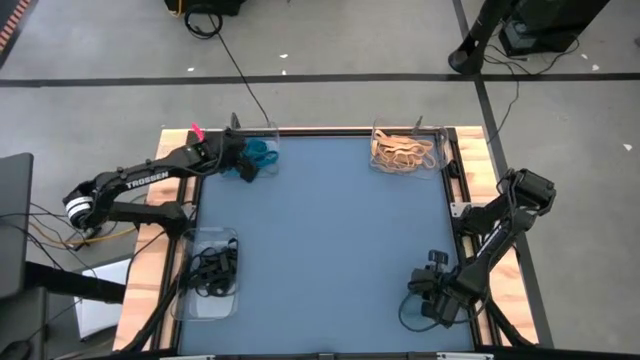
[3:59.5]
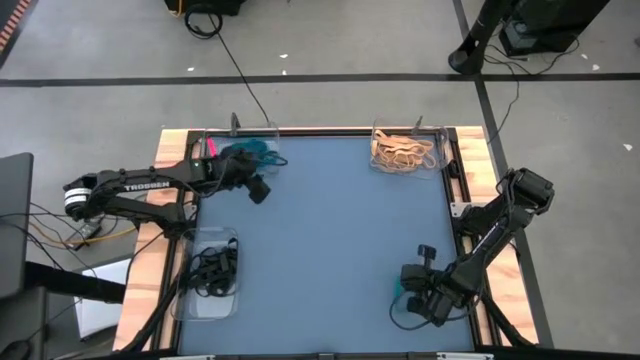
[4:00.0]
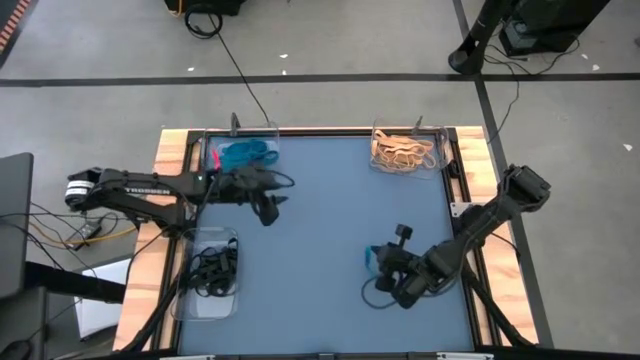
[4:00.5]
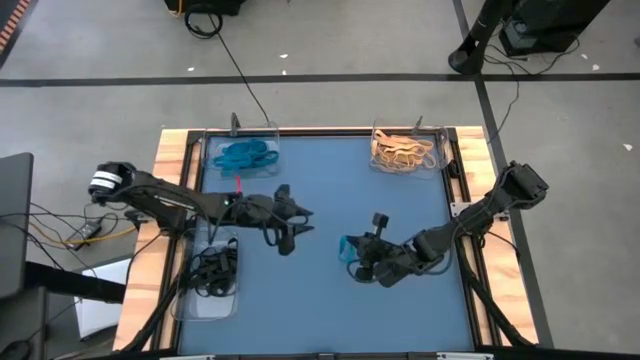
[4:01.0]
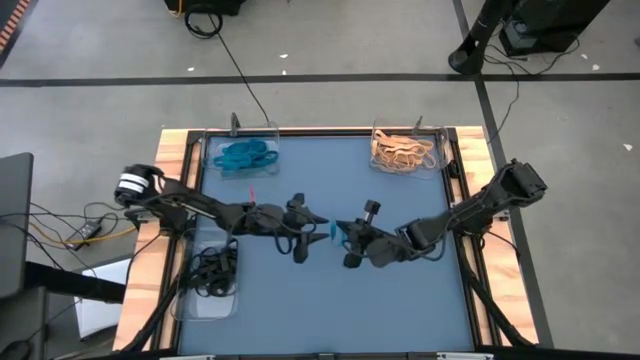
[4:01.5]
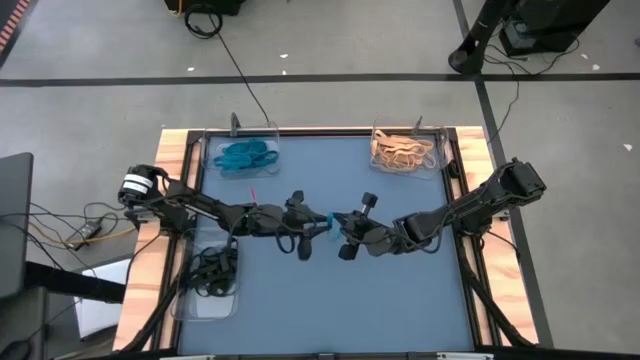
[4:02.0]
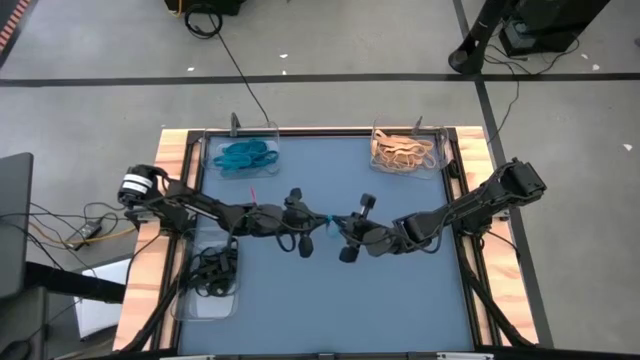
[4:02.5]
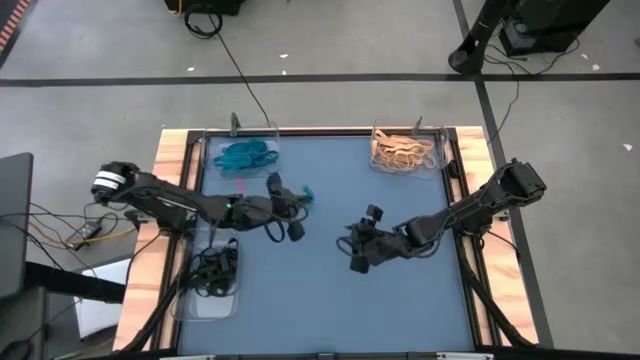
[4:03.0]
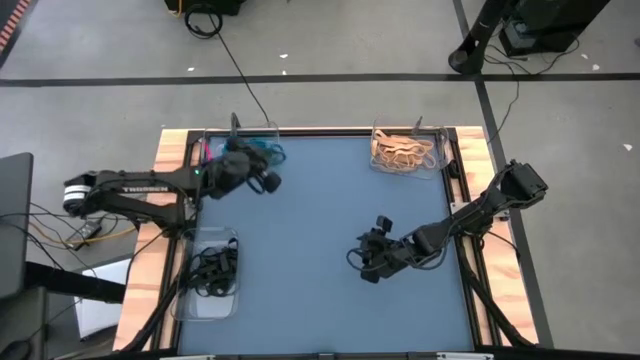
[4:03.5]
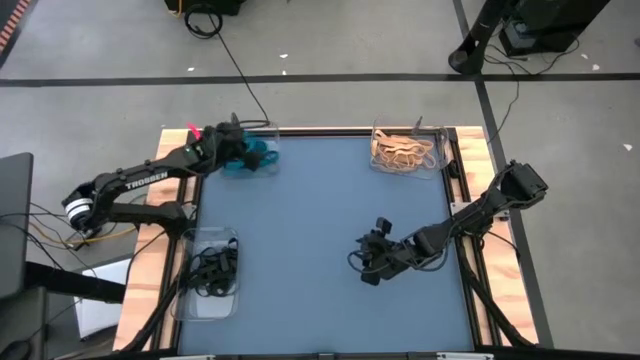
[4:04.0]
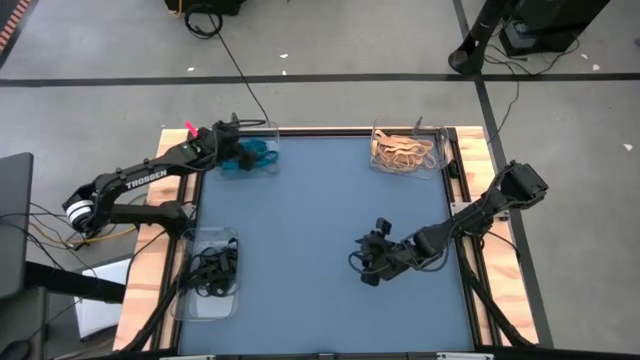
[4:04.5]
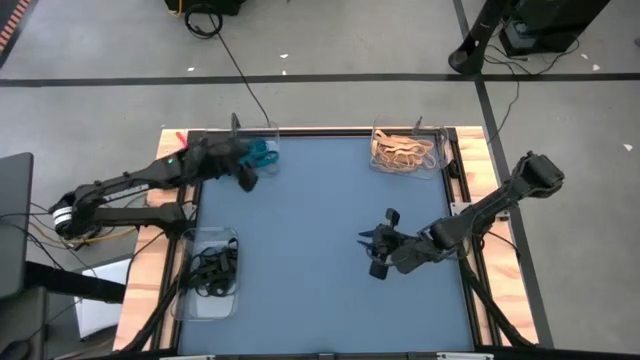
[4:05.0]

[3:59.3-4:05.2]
Task: Sort rubber bands into baskets
Put the blue rubber band into the top left transparent bin

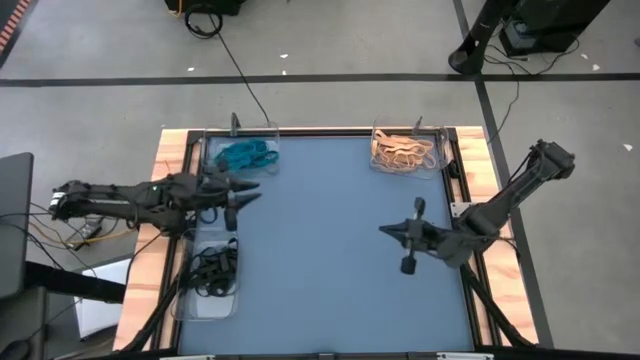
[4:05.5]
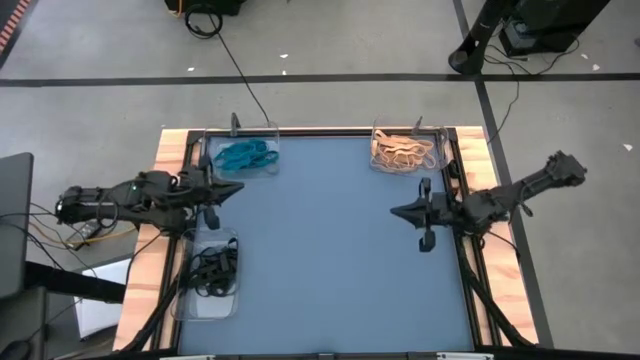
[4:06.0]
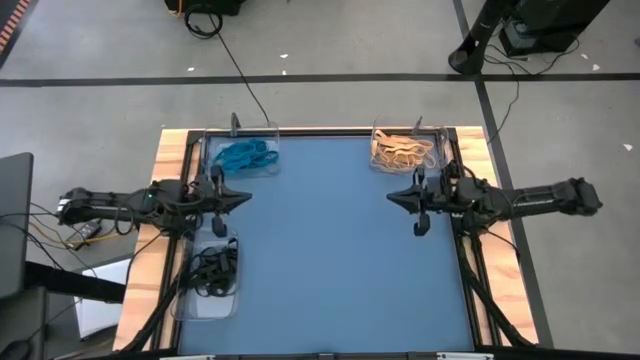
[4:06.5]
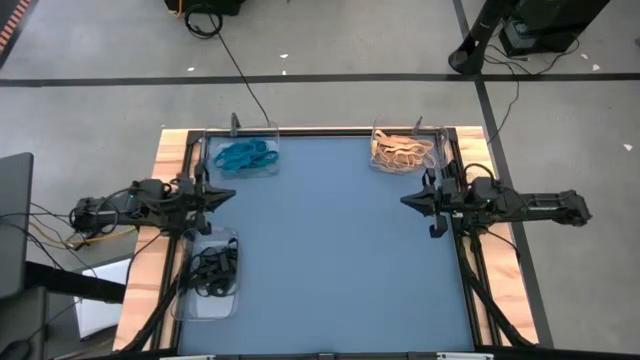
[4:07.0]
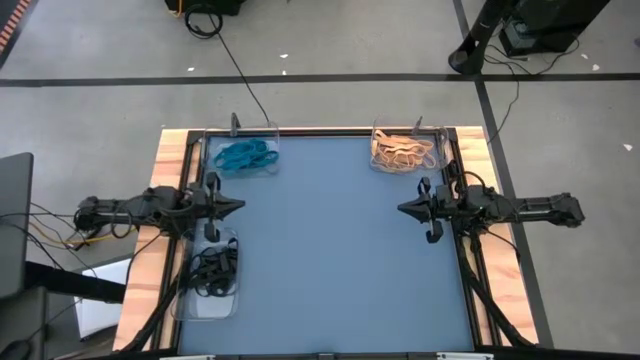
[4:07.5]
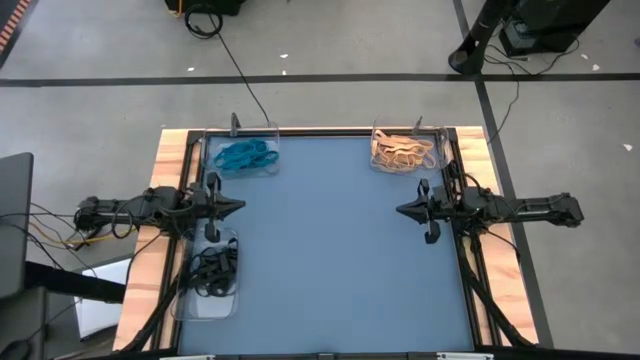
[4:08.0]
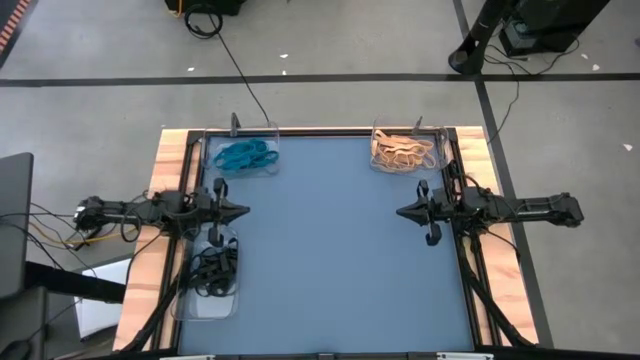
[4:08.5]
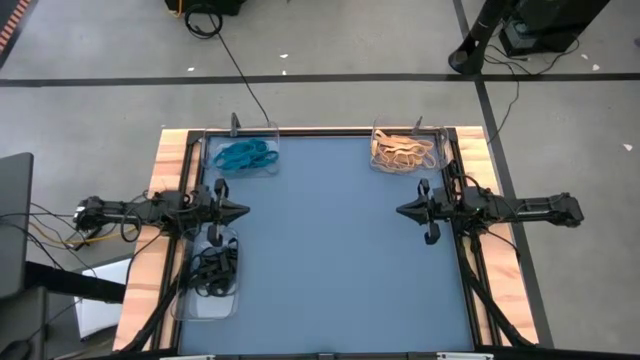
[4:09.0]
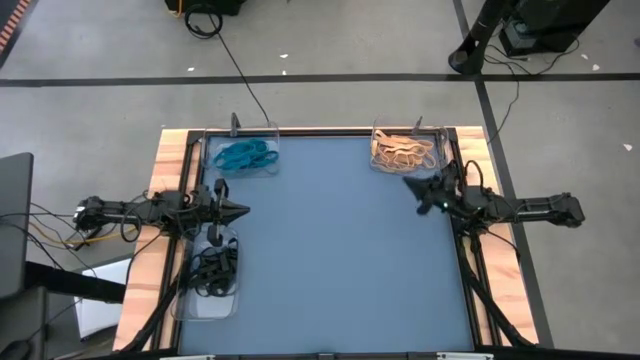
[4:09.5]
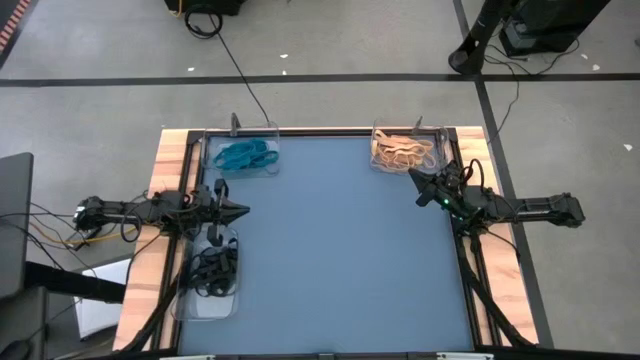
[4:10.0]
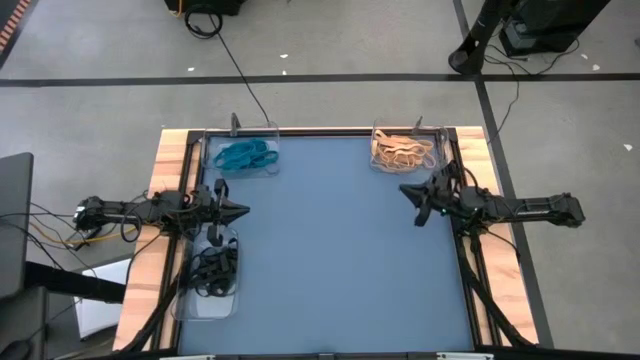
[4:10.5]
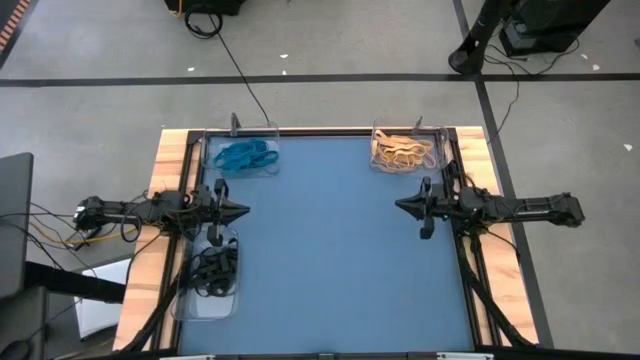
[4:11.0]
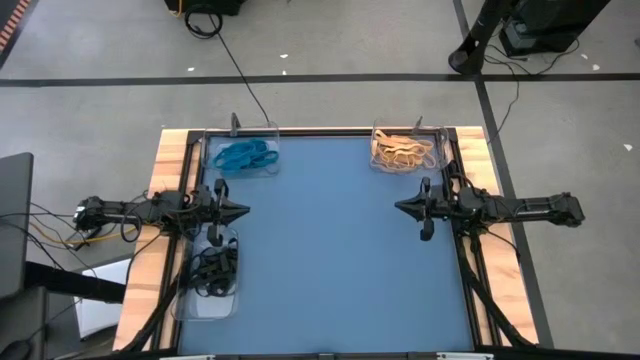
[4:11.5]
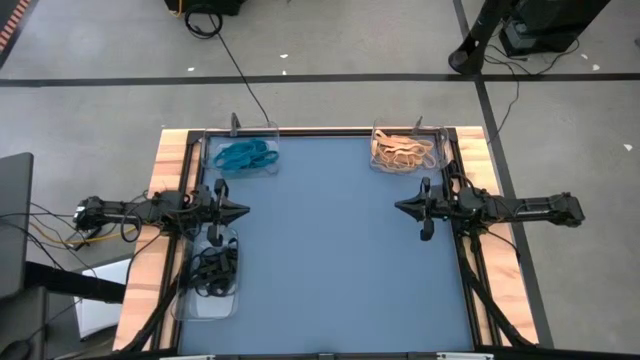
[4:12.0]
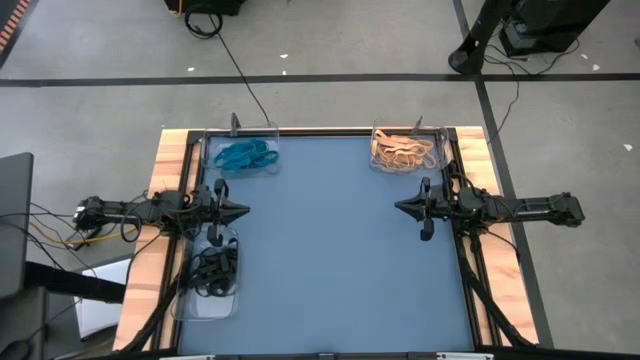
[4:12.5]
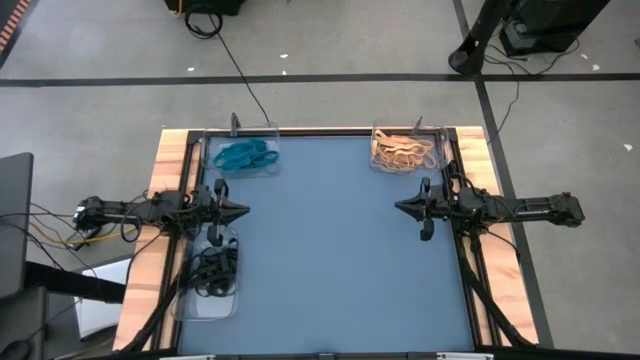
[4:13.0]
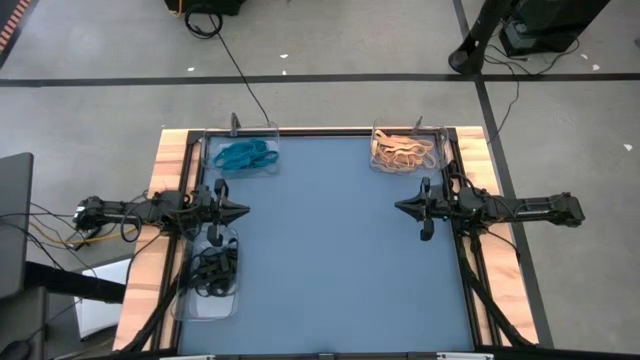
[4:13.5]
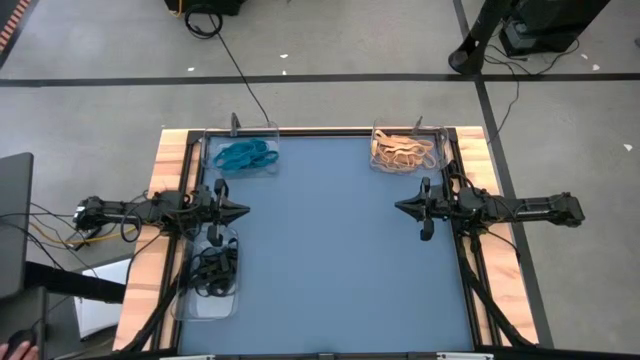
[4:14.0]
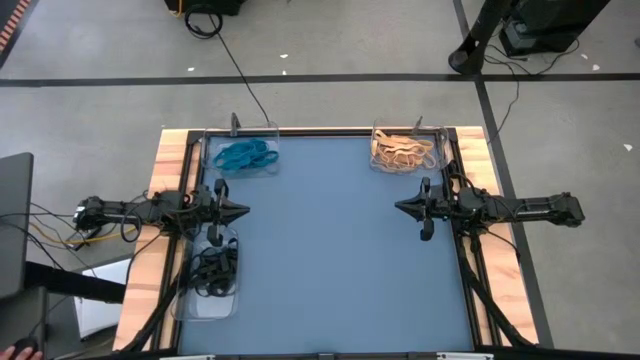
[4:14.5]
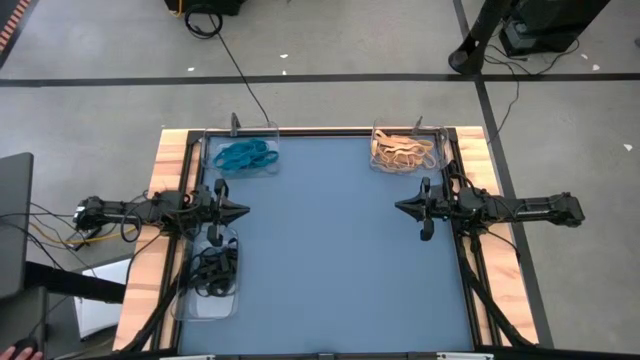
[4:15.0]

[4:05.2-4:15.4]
Return to Home Position
